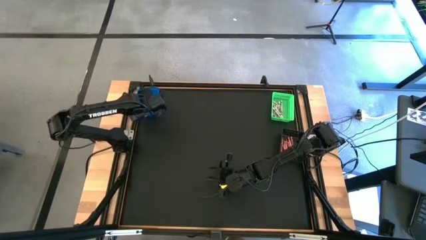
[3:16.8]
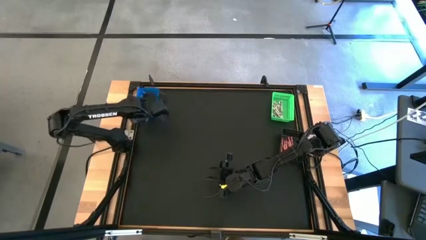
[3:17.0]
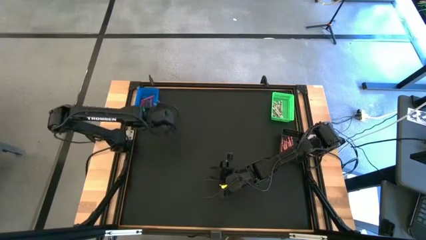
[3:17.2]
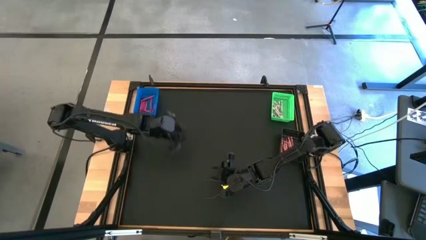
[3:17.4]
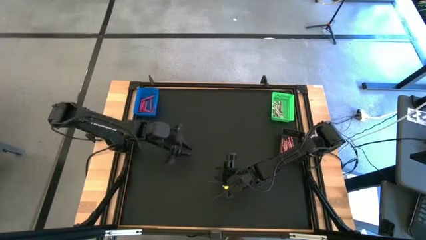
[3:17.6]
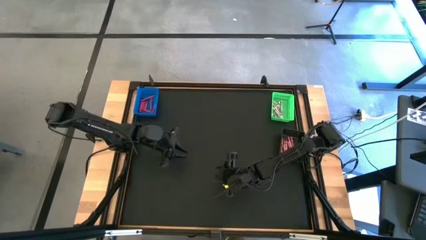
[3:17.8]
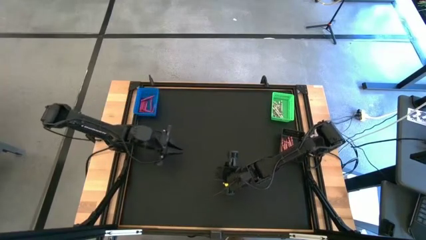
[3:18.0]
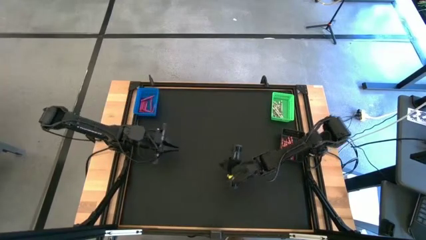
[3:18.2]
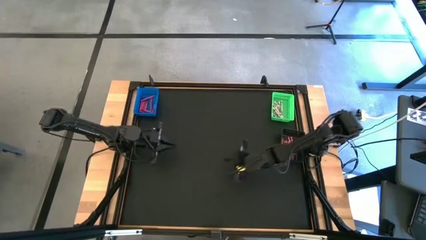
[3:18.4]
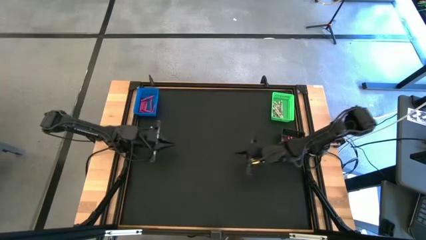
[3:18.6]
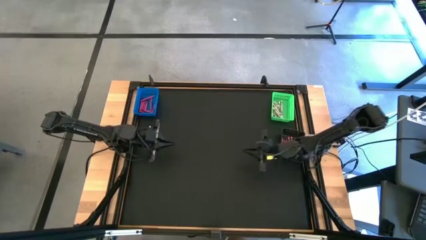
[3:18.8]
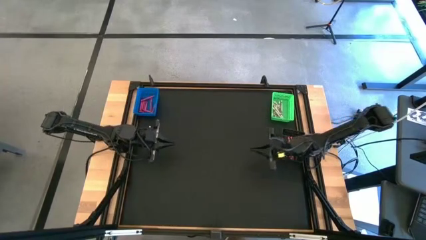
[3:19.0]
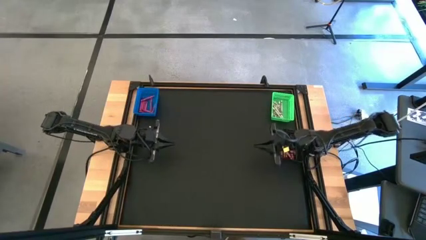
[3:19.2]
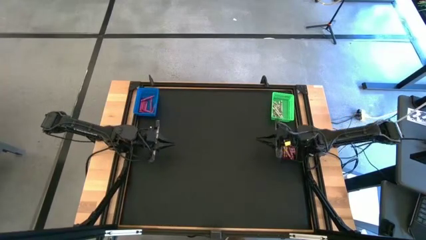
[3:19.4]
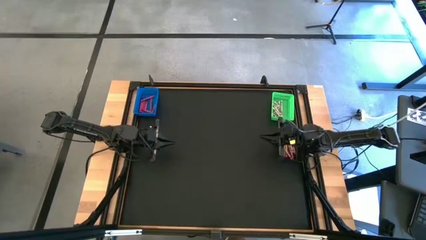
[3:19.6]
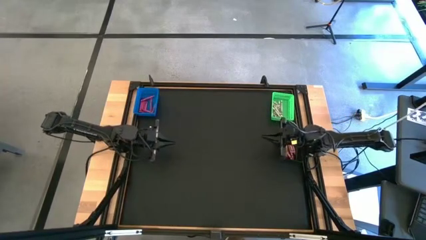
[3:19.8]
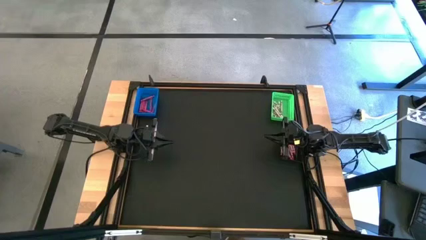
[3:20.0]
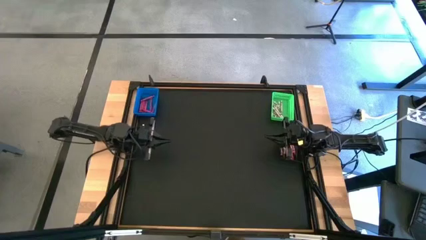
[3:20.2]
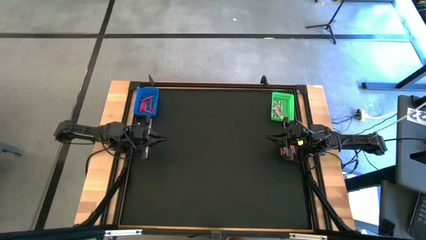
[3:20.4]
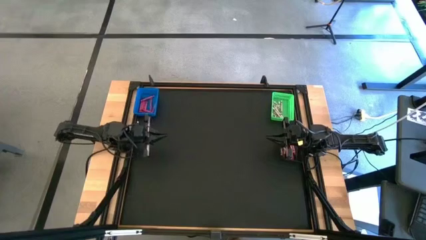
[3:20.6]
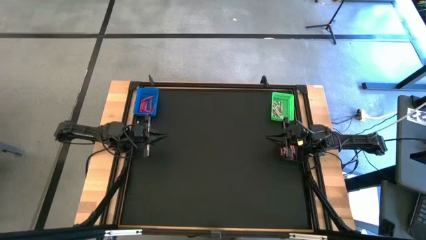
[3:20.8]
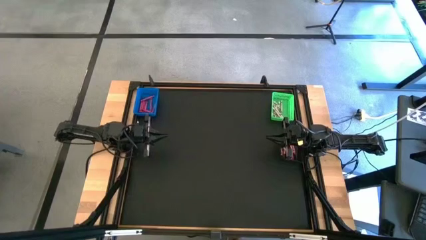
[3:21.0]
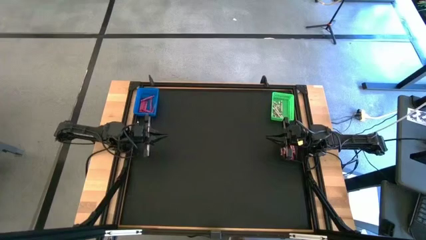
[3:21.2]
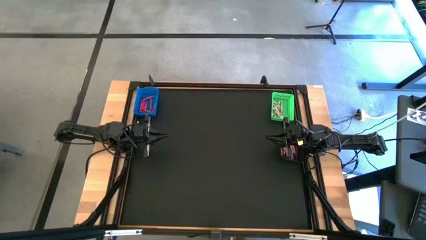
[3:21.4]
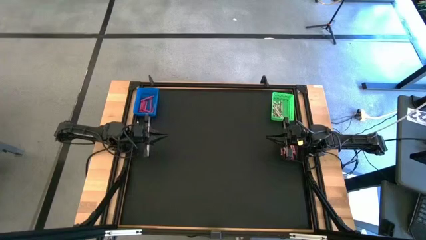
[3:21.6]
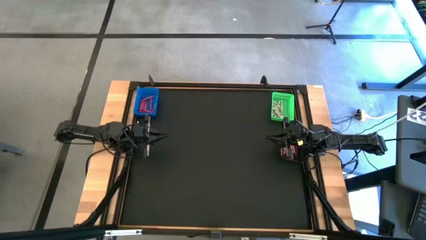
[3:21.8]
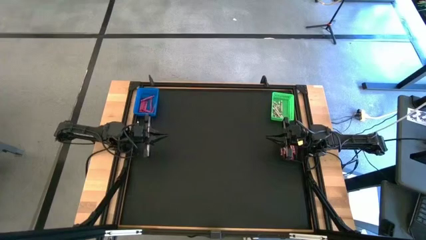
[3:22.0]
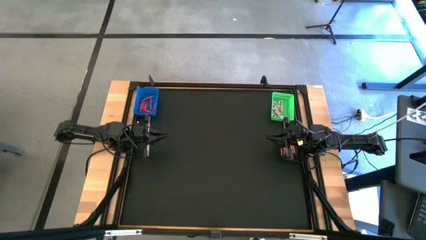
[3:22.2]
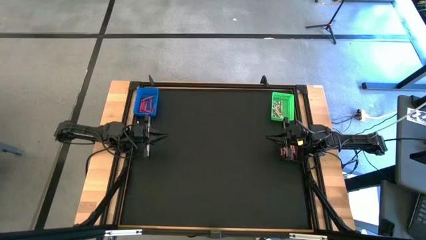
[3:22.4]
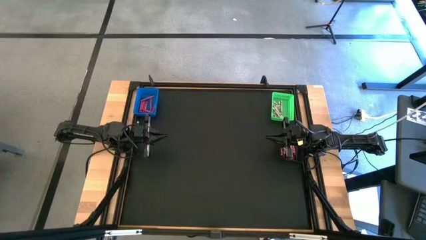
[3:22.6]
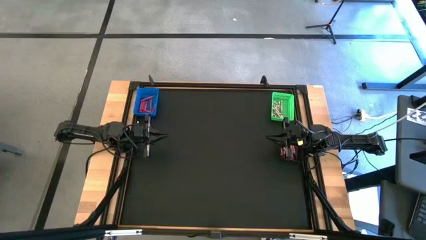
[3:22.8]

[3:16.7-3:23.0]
Task: Sort crayons
Return to Home Position

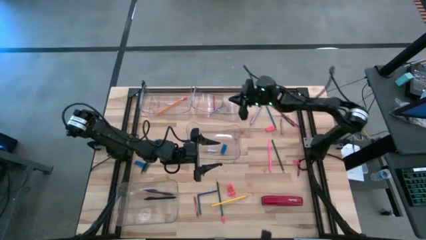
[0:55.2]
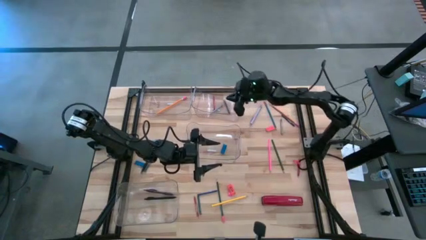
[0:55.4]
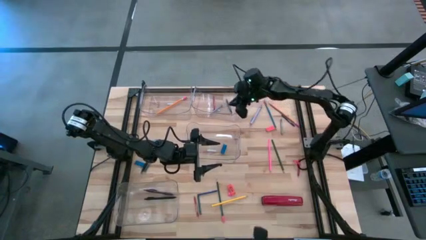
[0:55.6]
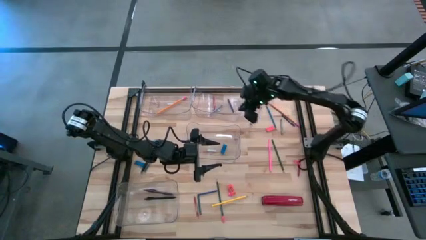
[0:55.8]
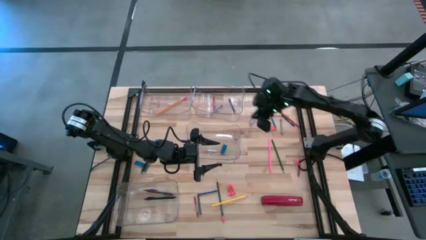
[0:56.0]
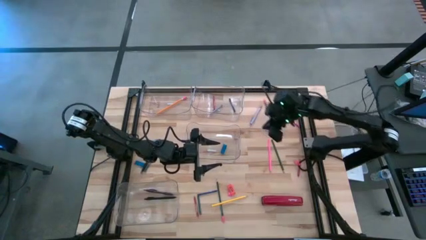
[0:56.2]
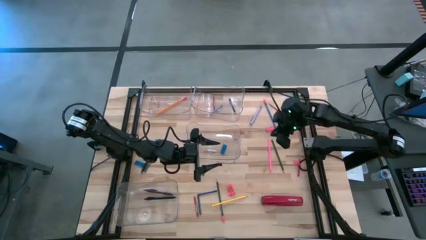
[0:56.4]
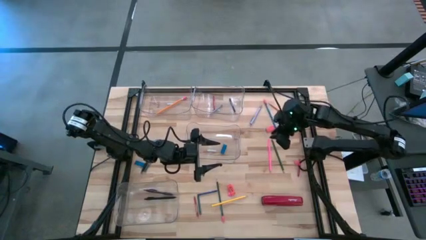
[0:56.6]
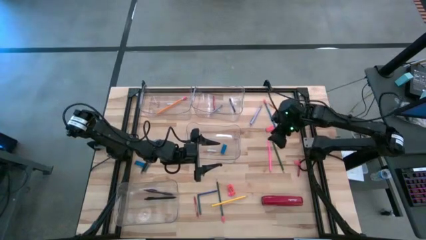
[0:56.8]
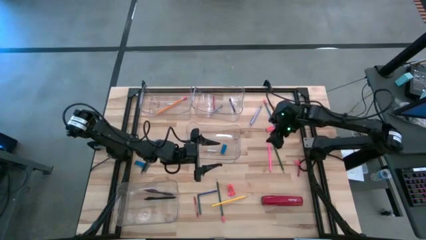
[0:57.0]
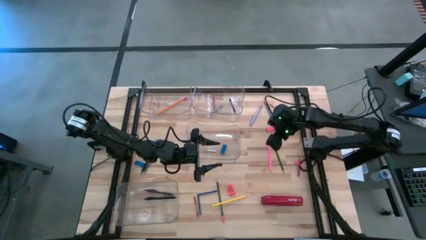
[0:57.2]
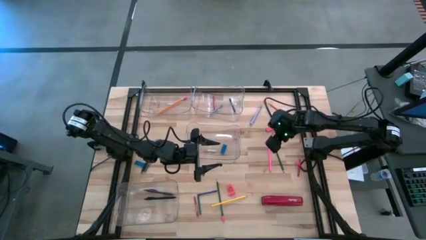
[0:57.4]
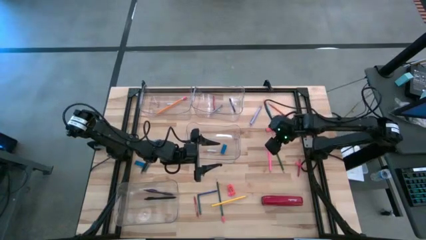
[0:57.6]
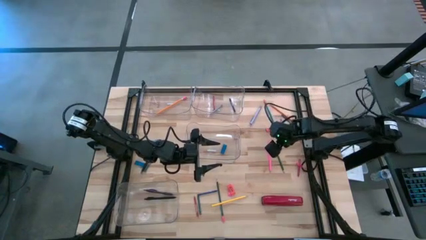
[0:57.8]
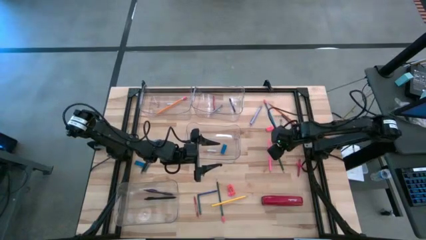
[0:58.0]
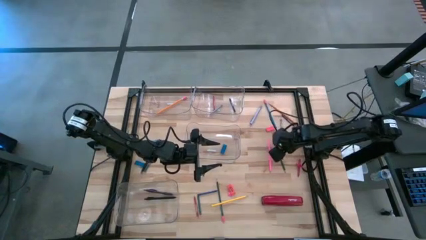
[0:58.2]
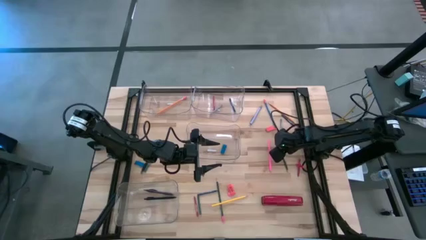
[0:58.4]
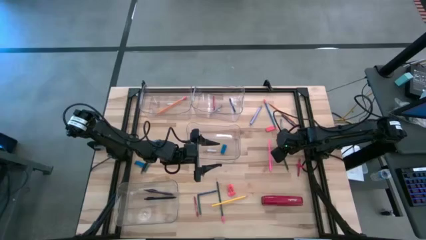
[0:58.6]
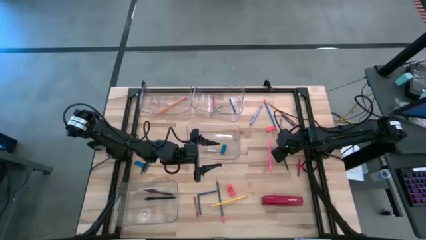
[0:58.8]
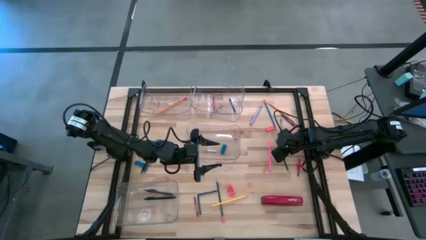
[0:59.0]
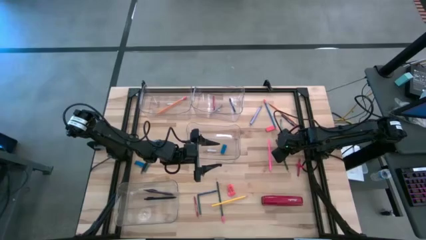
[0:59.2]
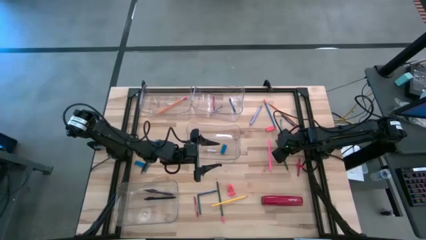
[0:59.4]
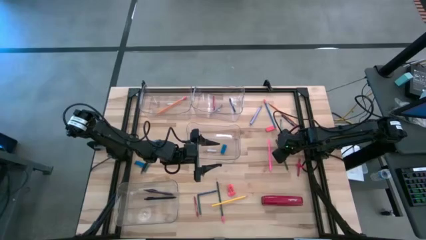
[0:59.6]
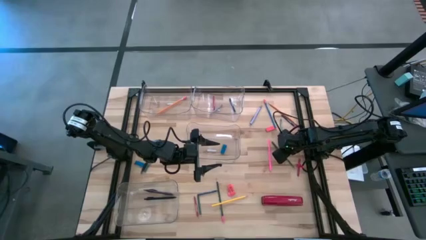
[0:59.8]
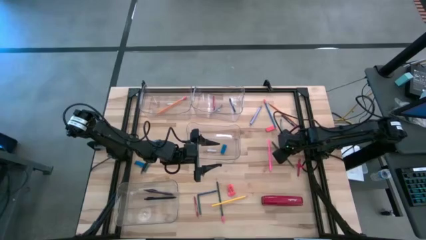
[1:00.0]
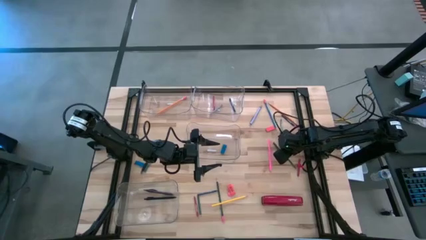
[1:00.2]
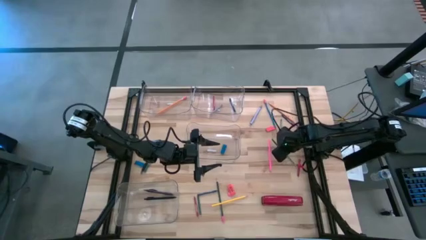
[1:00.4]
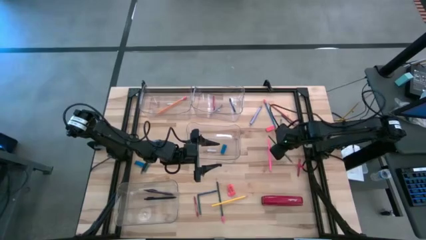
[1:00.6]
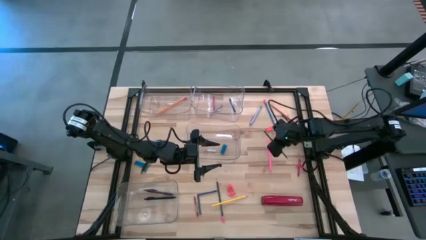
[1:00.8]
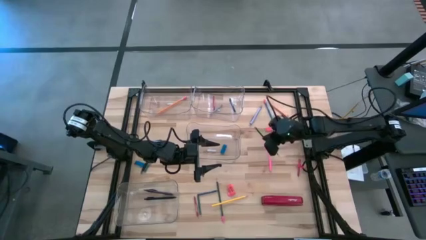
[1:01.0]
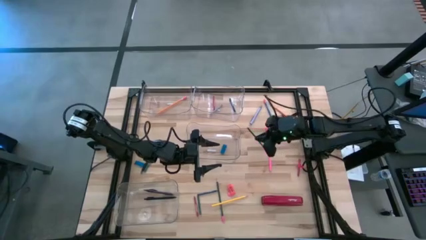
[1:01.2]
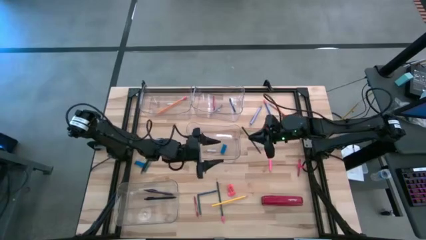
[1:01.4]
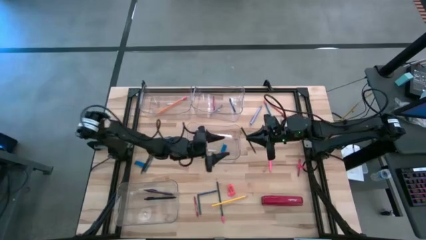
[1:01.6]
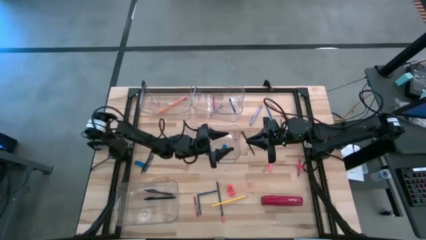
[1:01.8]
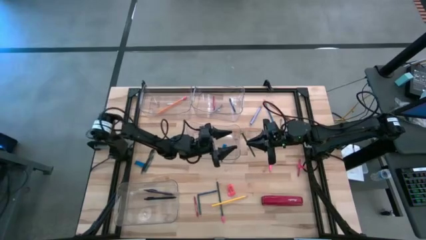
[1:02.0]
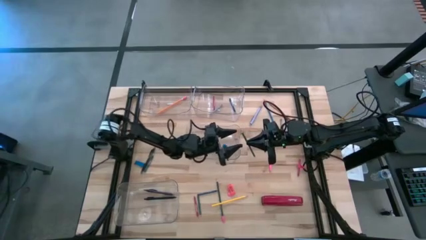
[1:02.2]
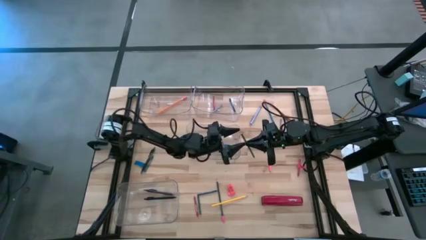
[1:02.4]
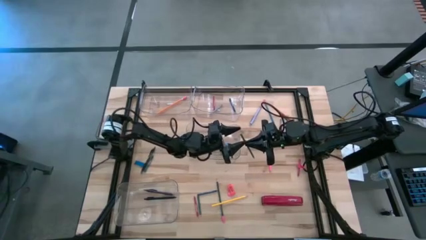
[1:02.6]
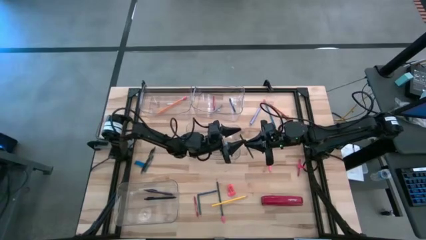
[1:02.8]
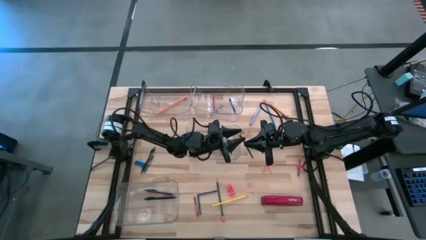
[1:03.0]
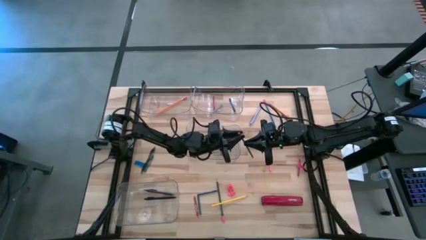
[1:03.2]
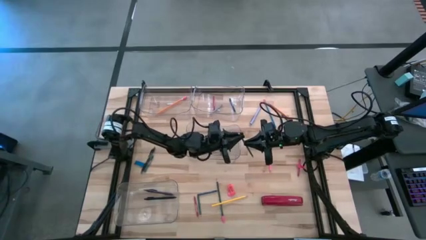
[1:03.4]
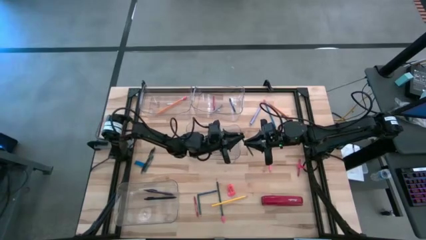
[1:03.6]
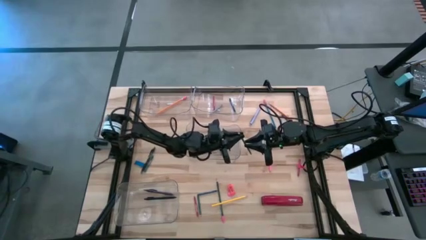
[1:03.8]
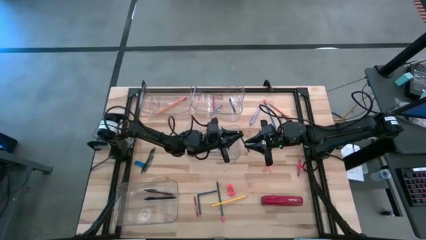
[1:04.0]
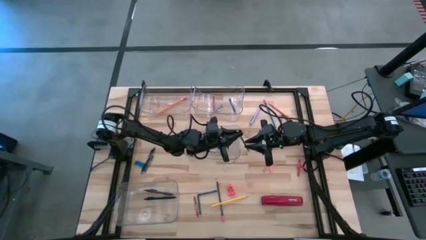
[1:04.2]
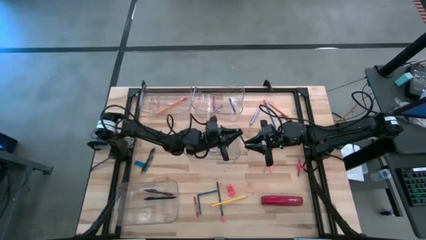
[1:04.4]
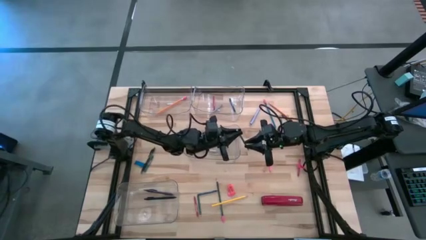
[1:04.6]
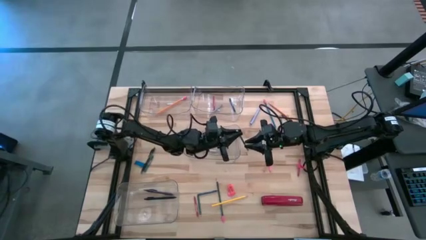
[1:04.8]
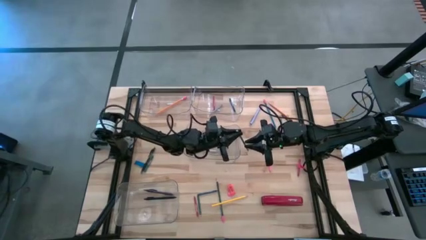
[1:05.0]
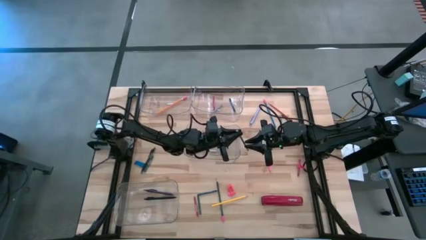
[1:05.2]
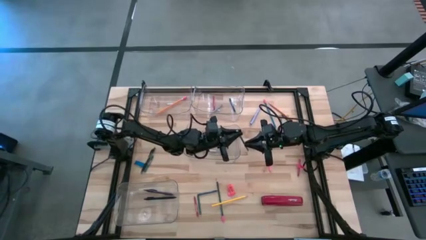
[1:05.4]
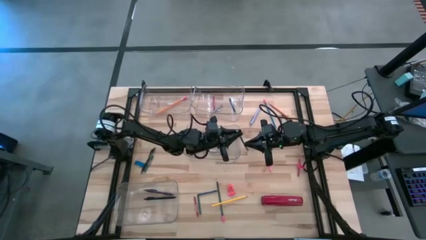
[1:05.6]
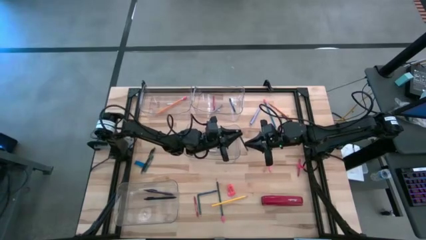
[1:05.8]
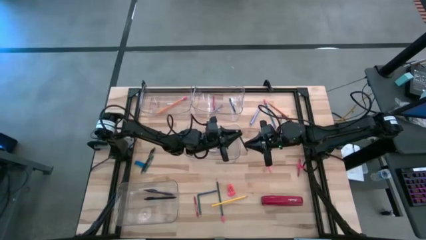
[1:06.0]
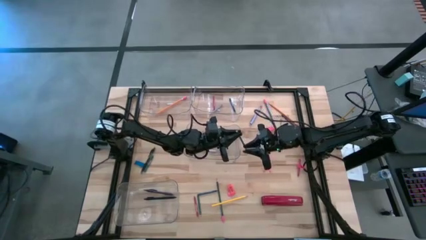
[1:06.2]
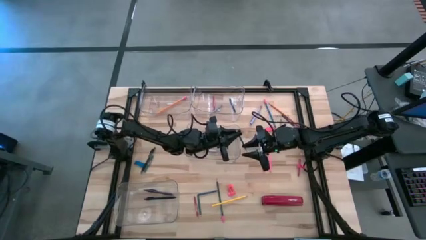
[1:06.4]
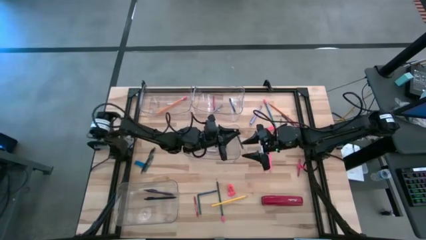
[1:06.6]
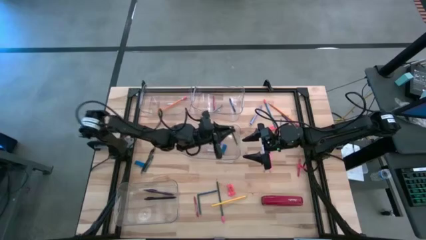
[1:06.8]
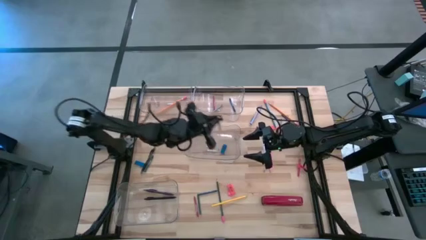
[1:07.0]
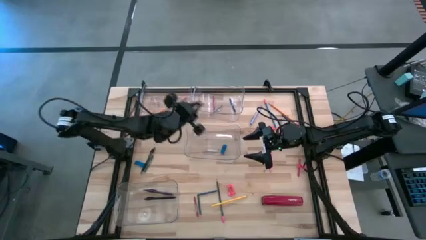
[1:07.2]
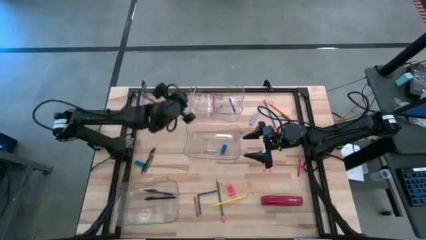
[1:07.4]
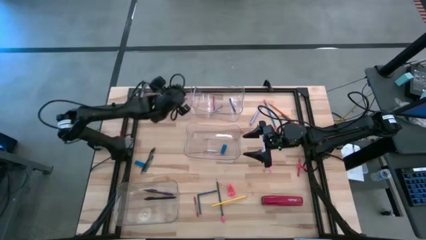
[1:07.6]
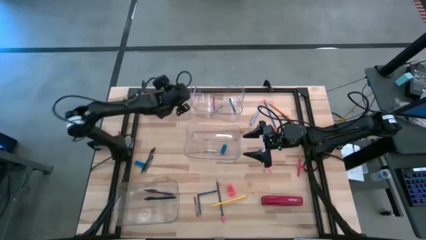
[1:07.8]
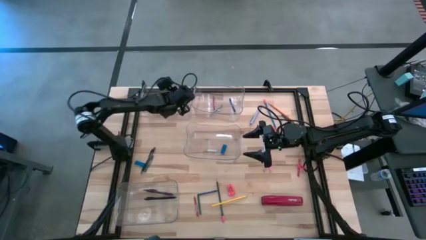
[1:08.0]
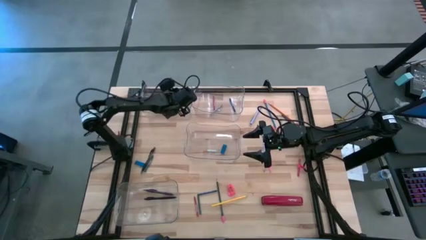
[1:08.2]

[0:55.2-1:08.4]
Task: Sort crayons/erasers/pens/pencils in bins
Put the top green pencil into the top left transparent bin
